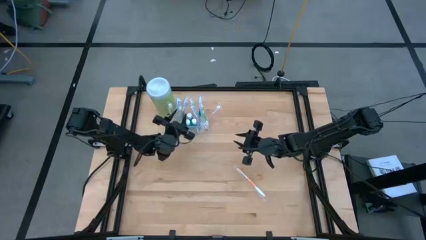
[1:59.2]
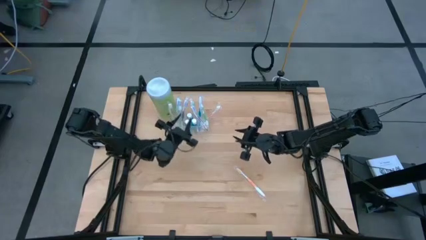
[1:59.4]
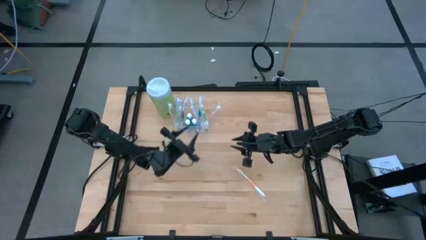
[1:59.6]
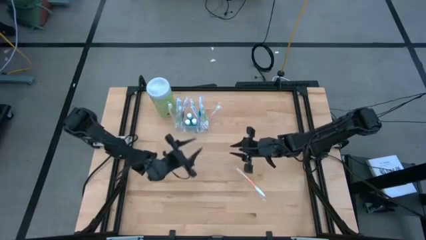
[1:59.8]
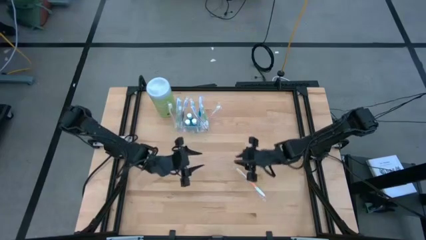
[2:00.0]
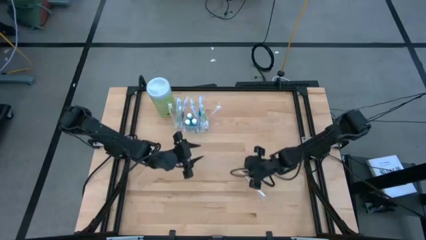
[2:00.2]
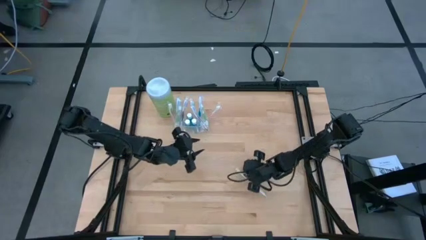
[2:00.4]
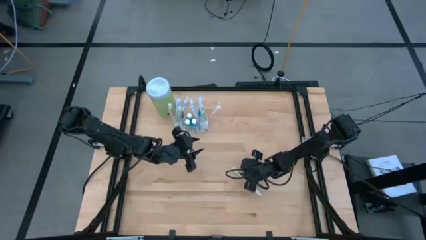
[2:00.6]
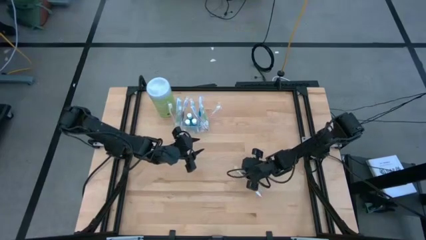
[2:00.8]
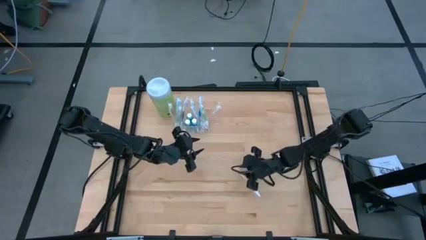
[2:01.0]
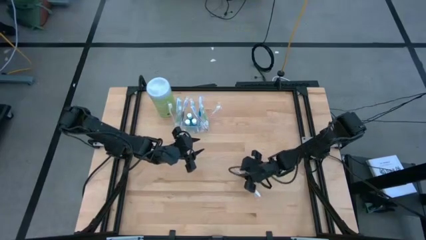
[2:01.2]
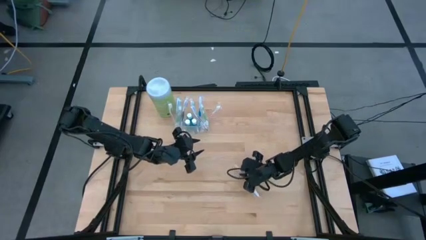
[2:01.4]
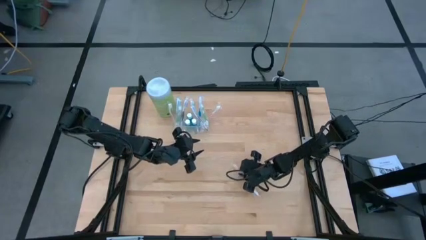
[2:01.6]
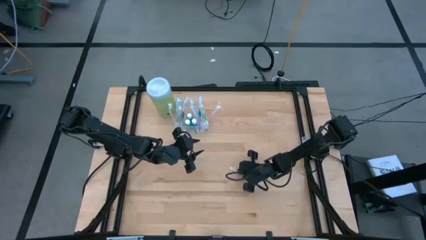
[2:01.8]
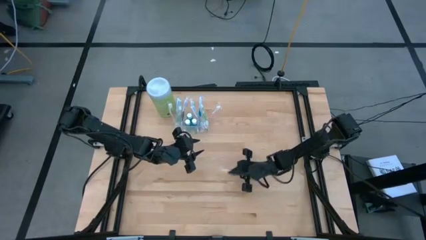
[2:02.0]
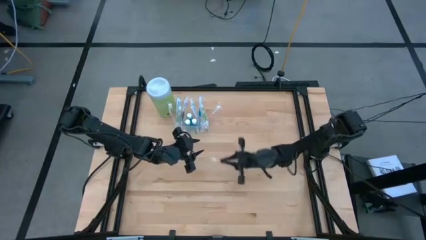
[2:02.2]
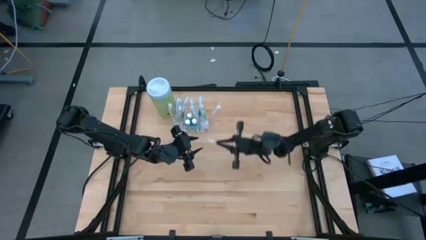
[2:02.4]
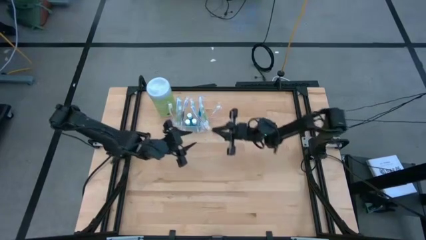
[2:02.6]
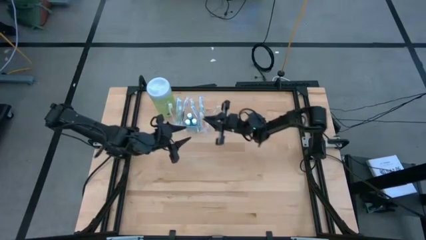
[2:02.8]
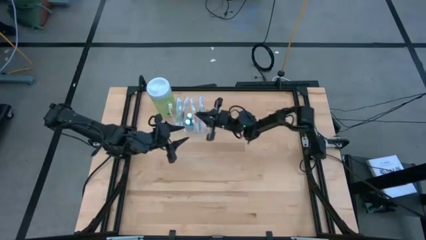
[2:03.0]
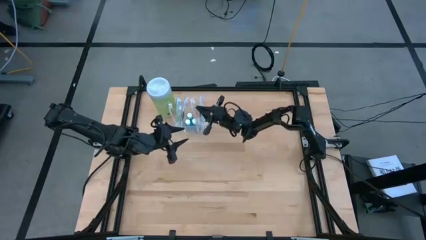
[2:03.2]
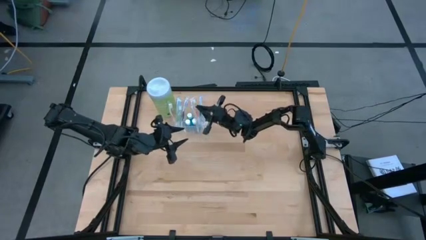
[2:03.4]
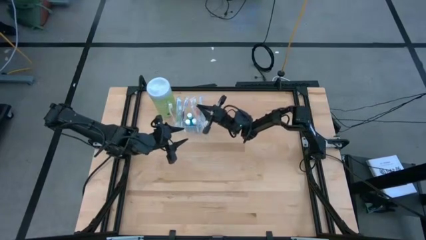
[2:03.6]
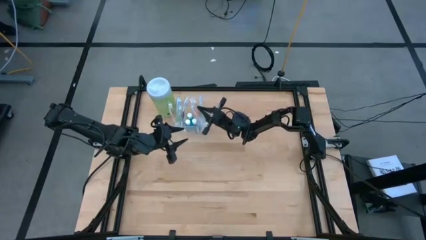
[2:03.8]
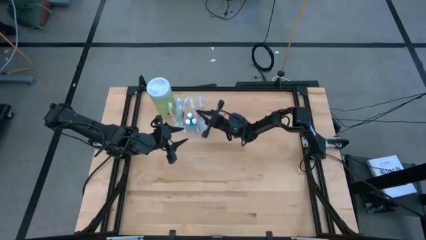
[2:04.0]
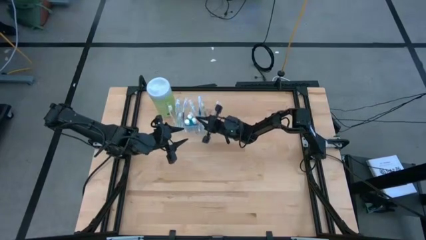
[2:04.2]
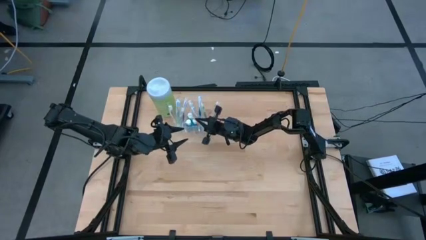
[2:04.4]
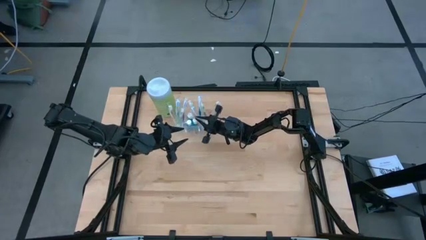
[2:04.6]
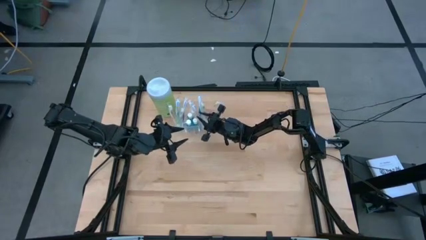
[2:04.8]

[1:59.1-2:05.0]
Task: Pick & Place toothbrushing station
Put the orange toothbrush into the transparent organizer

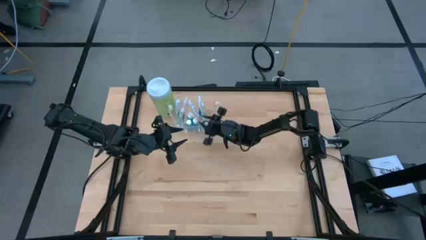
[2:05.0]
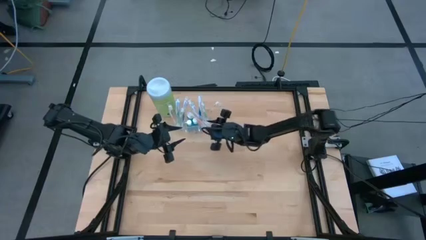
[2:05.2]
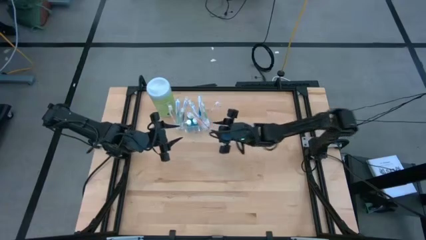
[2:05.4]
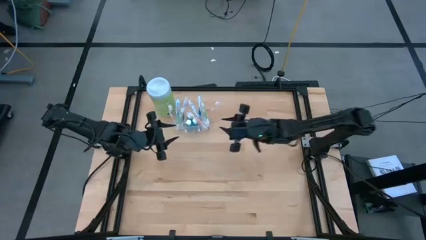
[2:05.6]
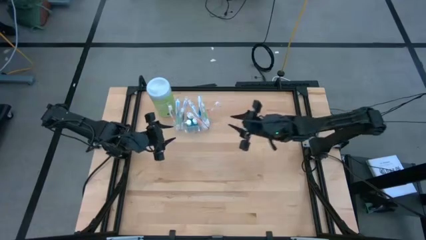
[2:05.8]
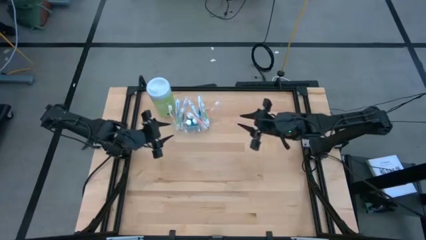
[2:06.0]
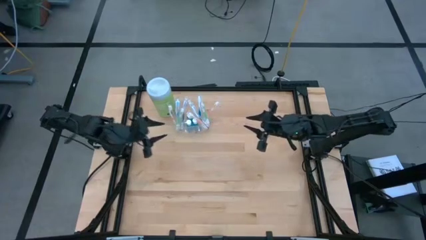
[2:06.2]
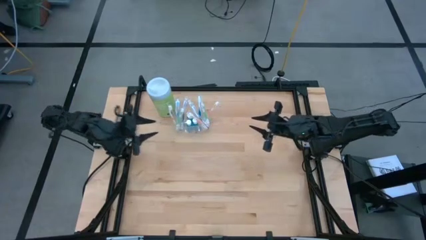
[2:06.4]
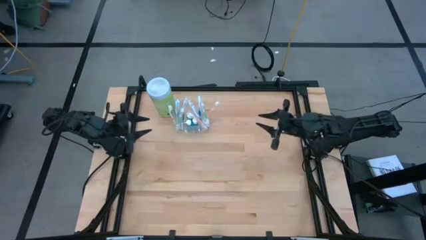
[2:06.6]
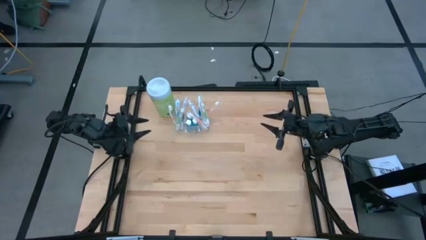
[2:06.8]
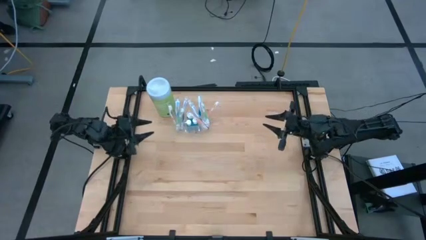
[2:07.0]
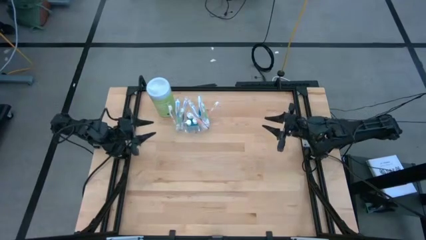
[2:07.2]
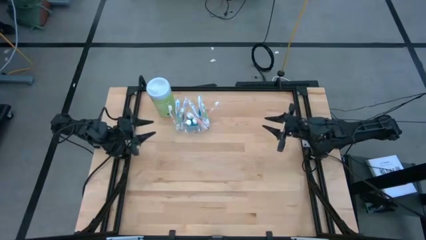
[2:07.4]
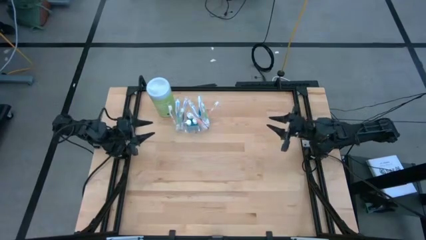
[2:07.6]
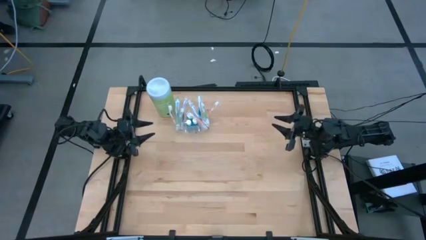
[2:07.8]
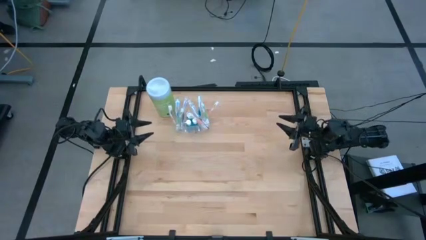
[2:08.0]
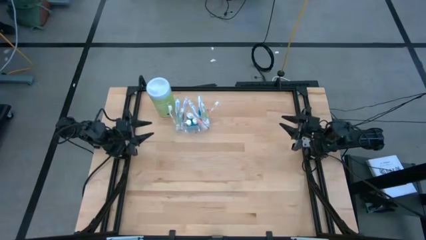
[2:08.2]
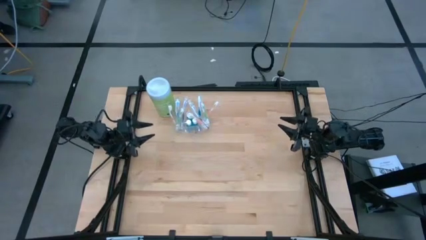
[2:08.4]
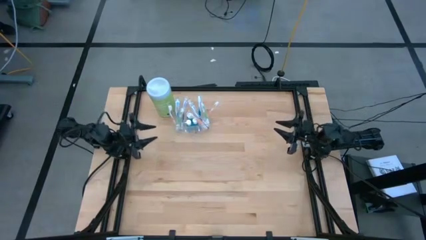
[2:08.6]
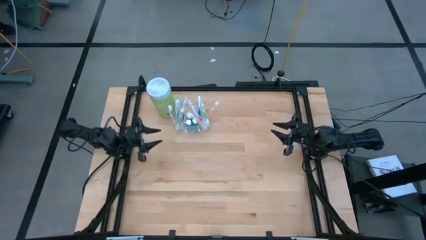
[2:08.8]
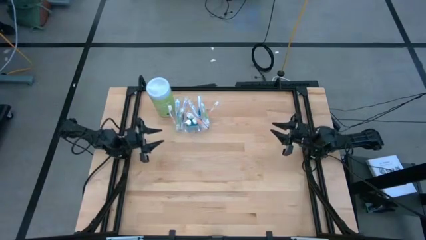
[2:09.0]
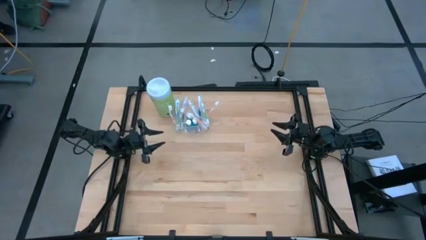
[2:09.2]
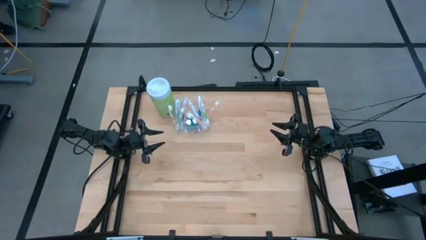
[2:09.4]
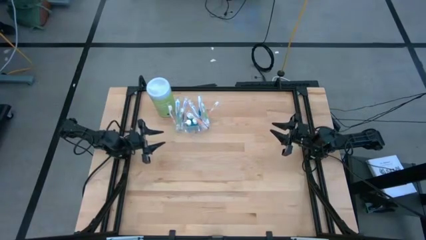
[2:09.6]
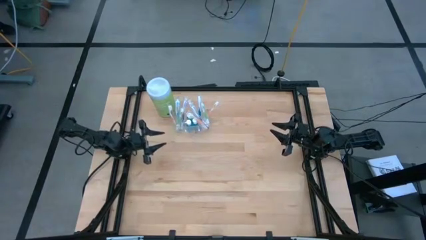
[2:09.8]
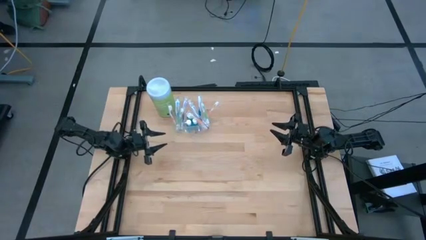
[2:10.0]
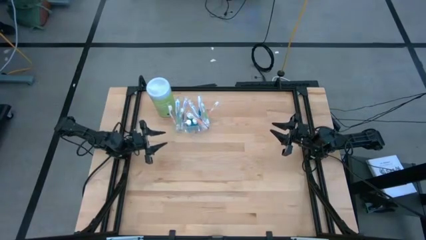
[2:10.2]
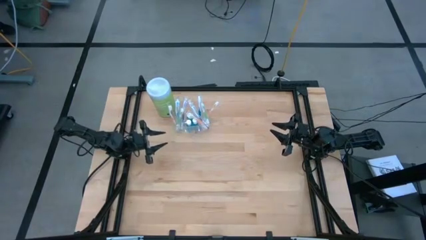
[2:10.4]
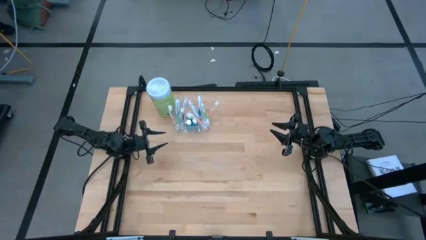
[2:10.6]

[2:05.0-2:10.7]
Return to Home Position

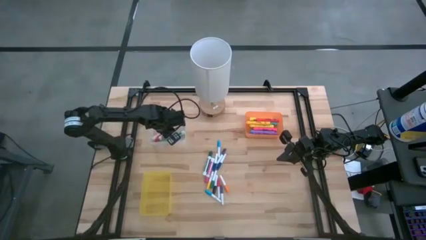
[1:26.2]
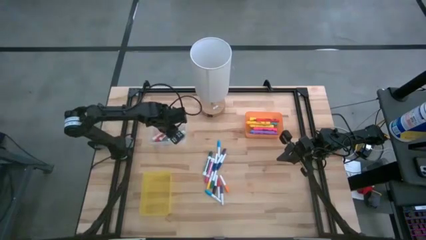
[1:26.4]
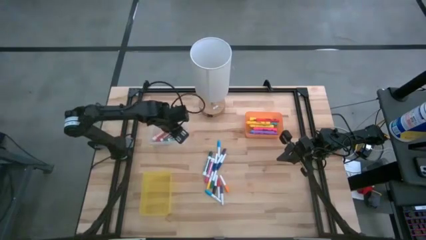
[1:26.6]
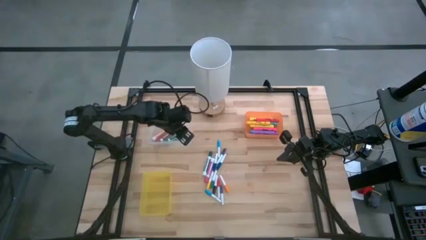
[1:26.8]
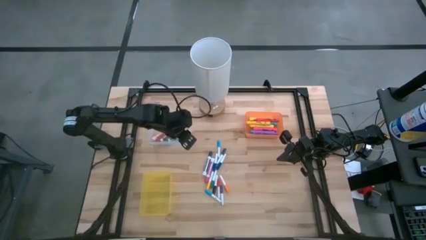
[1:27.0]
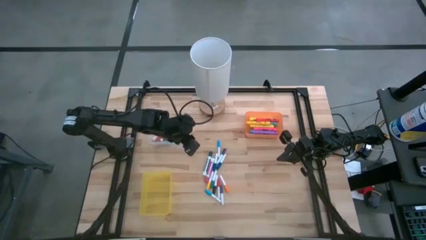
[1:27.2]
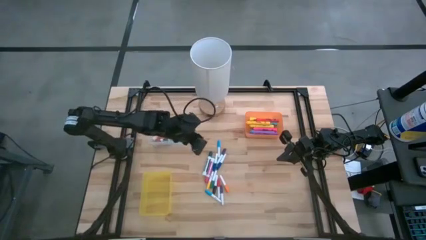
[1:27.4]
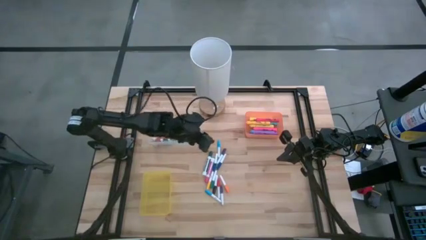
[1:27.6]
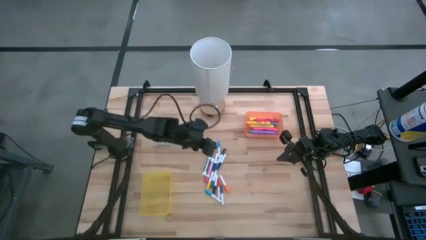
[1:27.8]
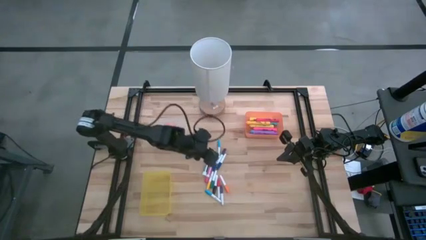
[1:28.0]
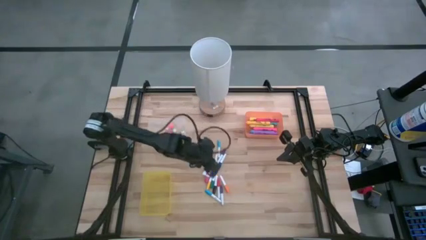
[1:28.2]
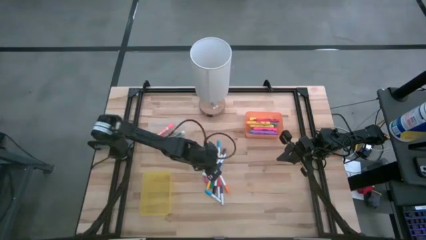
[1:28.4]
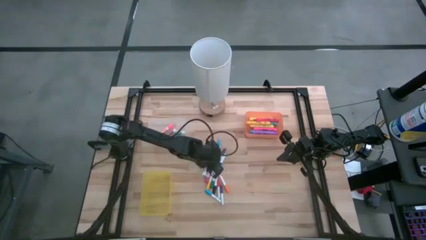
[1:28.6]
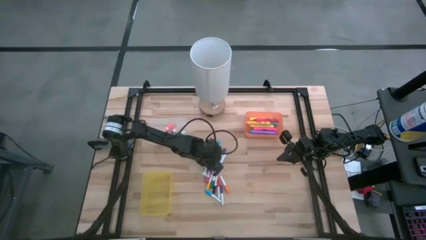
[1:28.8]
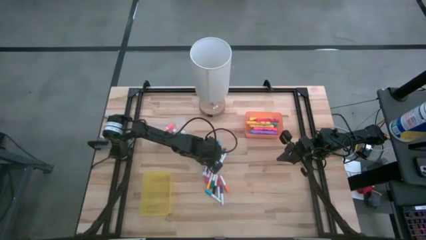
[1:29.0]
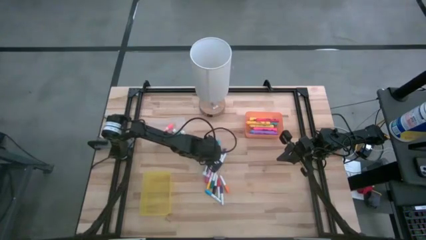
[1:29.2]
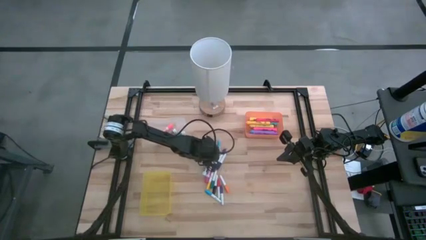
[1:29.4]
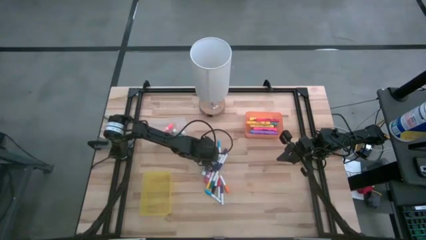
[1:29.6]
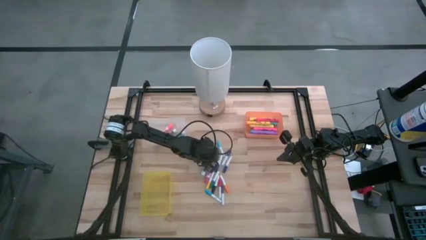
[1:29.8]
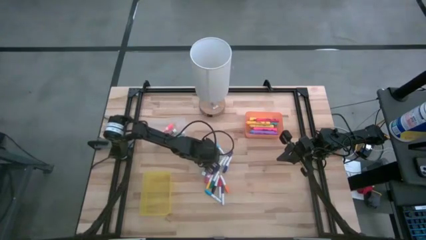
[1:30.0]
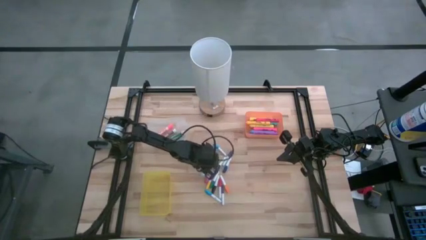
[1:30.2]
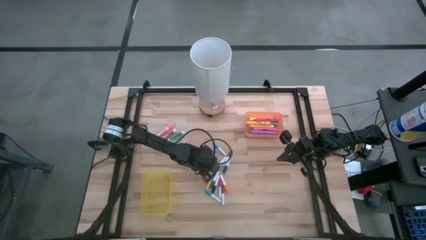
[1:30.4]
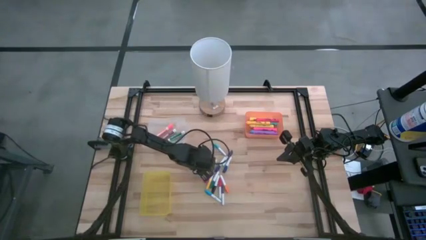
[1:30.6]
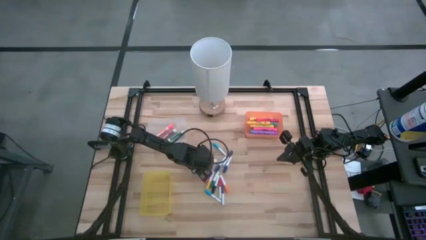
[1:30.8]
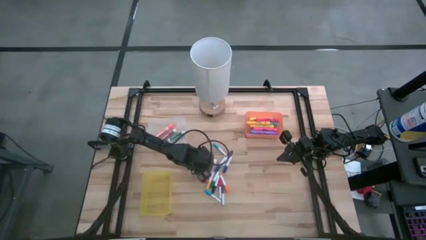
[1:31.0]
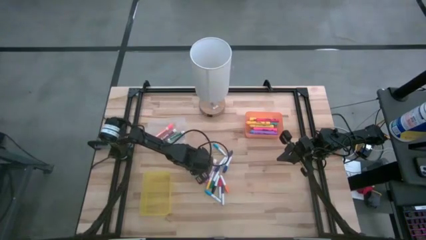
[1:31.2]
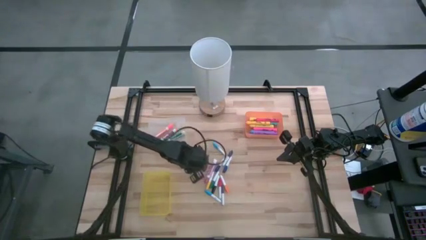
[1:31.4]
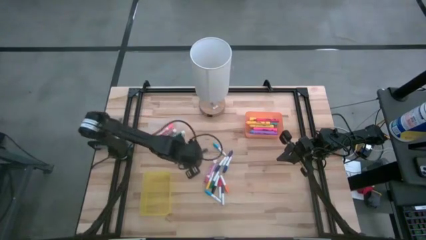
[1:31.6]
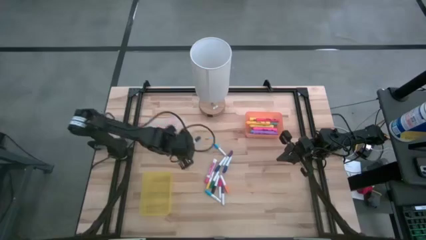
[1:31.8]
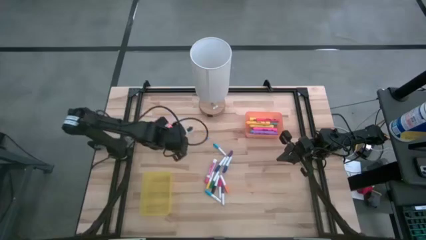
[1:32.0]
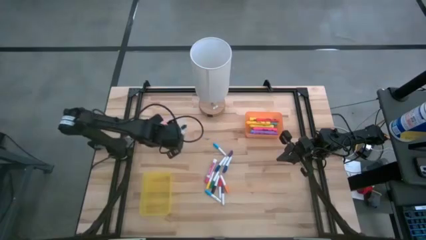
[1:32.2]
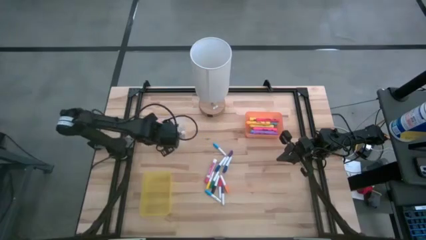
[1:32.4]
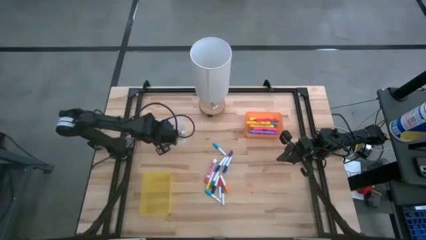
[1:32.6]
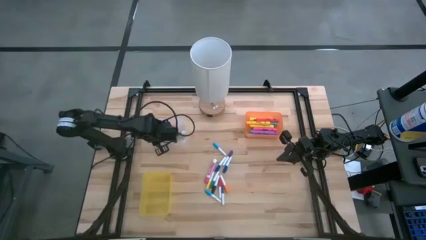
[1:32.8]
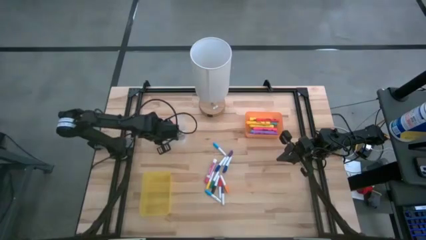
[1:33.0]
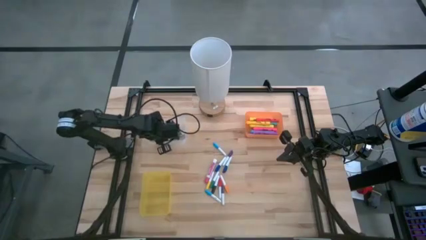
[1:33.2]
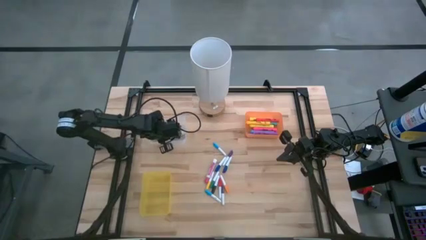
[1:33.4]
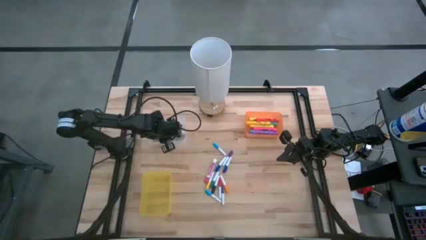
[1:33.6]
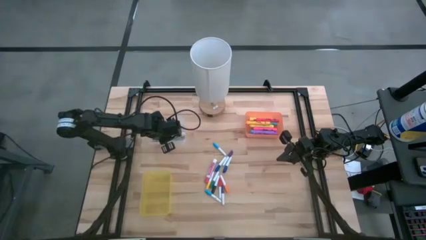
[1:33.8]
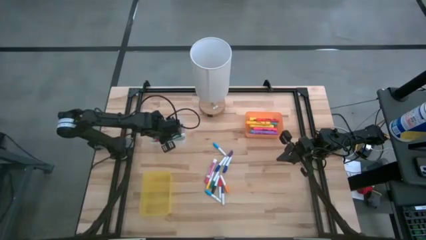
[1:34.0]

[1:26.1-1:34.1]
Task: Pick & Place Markers
Put the dark green marker pen into the white bin
